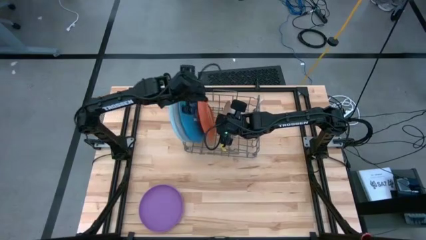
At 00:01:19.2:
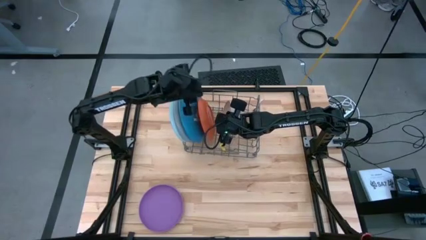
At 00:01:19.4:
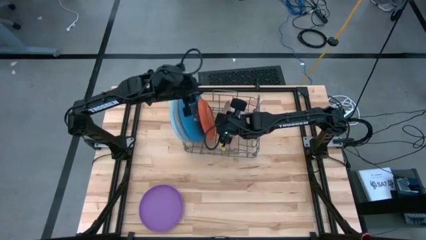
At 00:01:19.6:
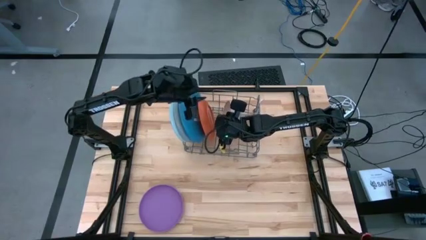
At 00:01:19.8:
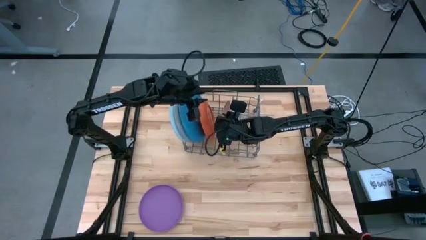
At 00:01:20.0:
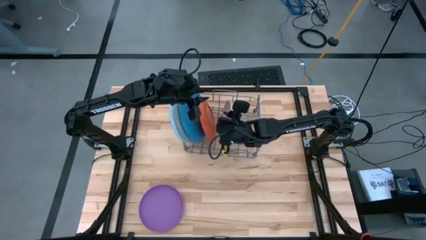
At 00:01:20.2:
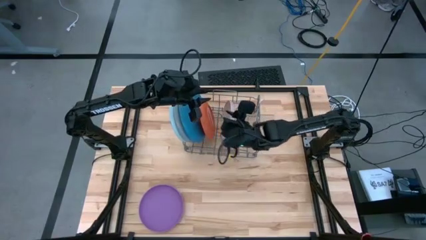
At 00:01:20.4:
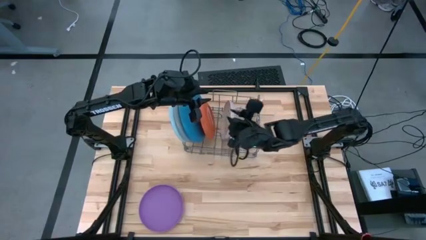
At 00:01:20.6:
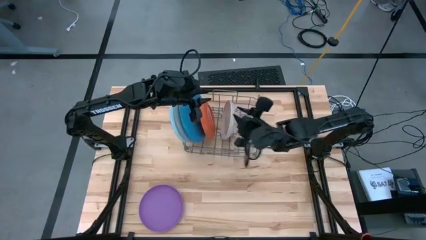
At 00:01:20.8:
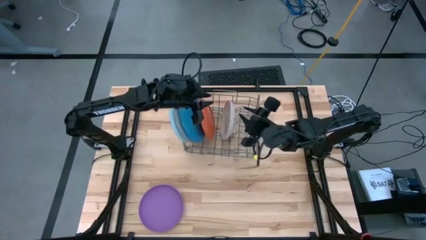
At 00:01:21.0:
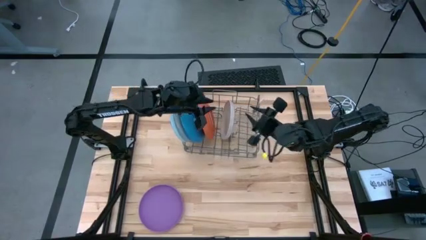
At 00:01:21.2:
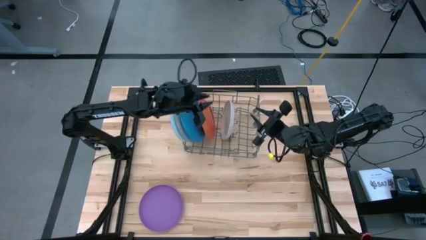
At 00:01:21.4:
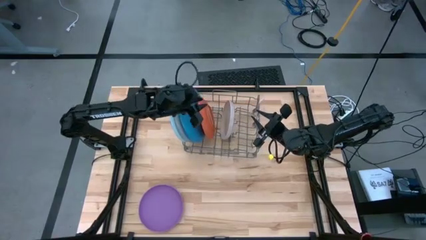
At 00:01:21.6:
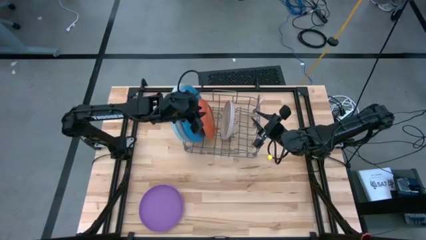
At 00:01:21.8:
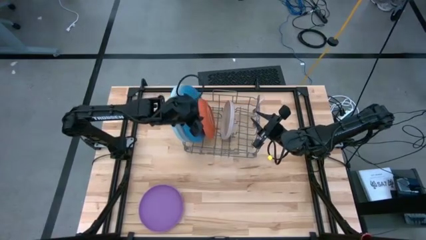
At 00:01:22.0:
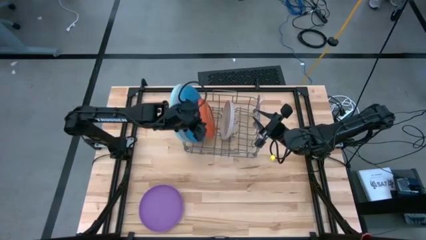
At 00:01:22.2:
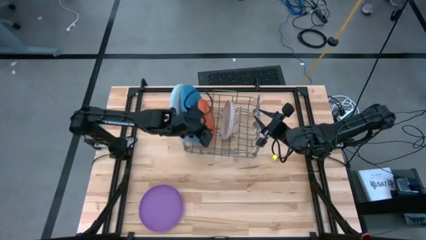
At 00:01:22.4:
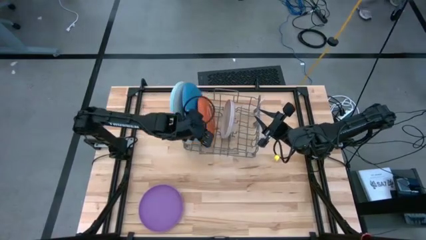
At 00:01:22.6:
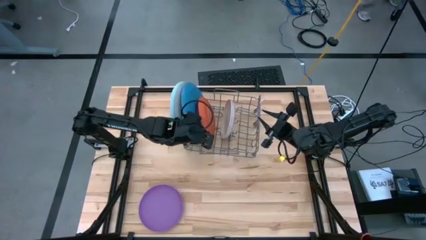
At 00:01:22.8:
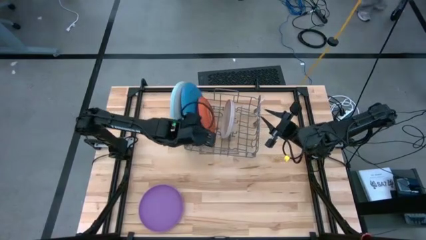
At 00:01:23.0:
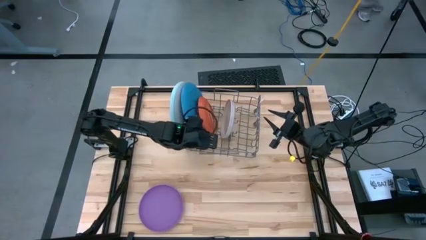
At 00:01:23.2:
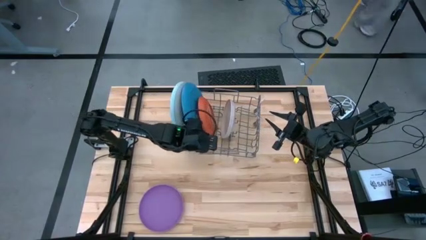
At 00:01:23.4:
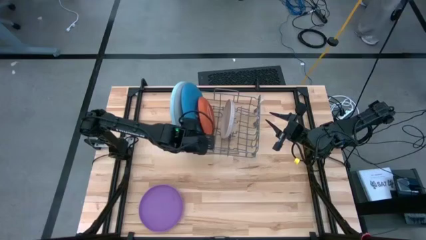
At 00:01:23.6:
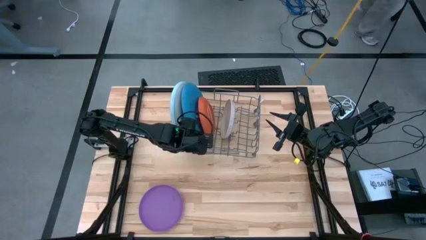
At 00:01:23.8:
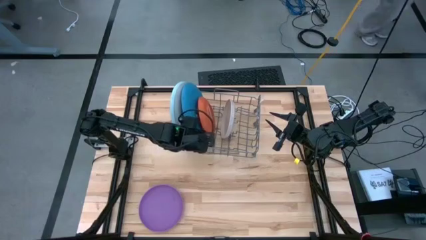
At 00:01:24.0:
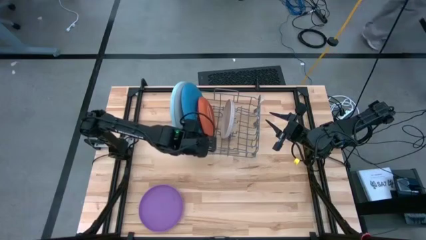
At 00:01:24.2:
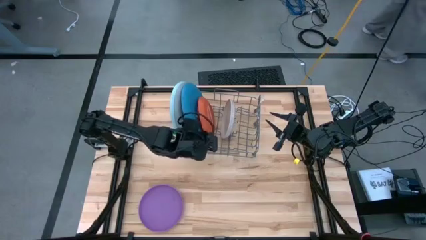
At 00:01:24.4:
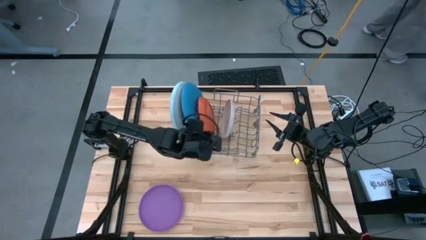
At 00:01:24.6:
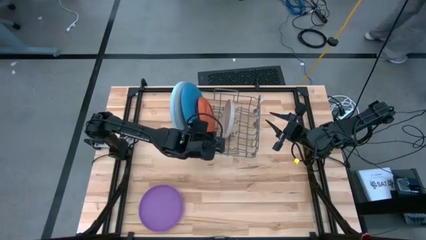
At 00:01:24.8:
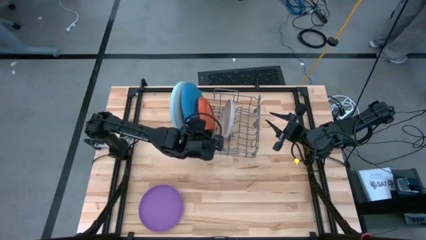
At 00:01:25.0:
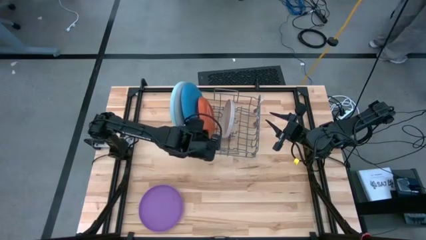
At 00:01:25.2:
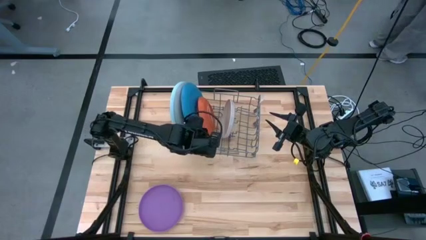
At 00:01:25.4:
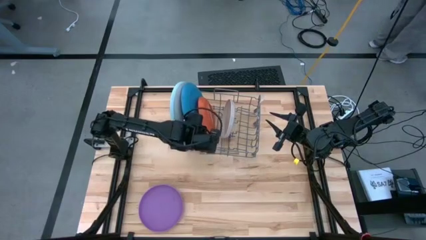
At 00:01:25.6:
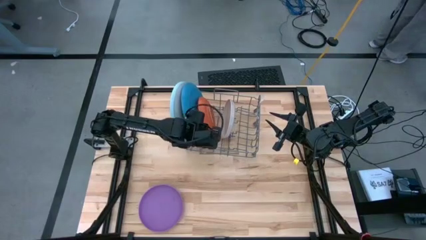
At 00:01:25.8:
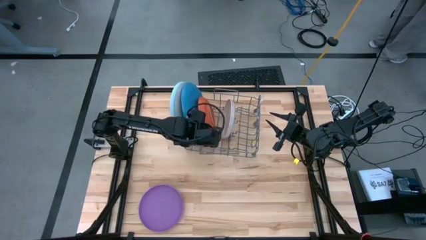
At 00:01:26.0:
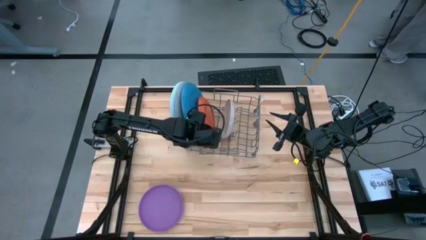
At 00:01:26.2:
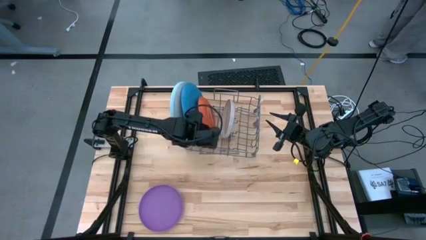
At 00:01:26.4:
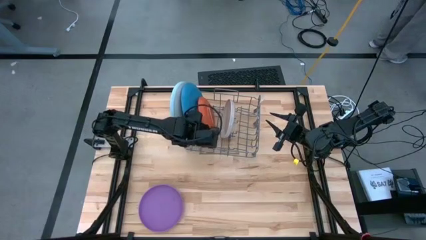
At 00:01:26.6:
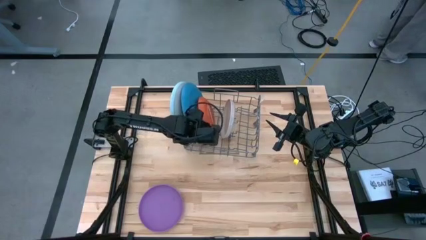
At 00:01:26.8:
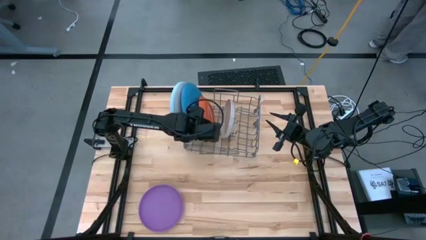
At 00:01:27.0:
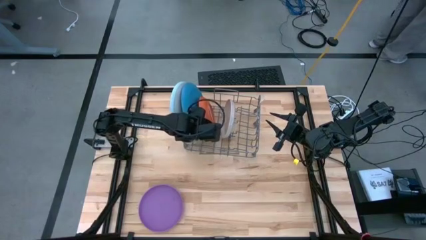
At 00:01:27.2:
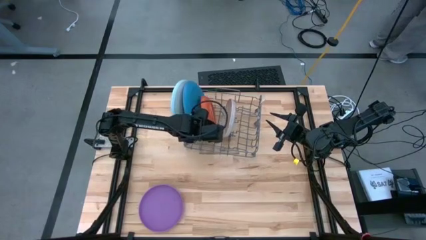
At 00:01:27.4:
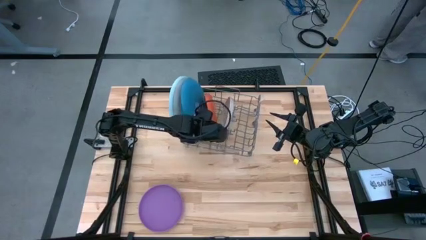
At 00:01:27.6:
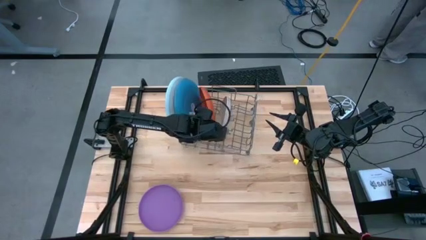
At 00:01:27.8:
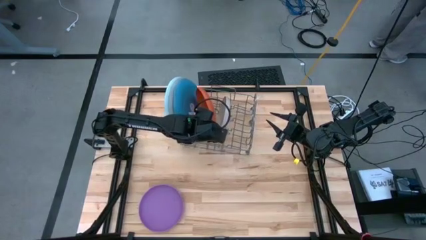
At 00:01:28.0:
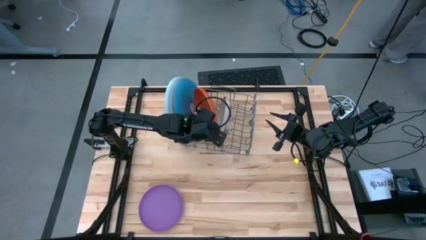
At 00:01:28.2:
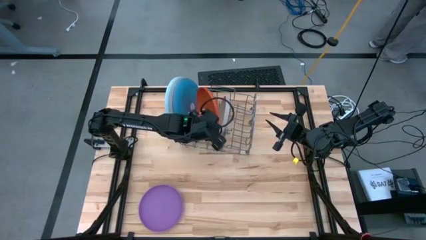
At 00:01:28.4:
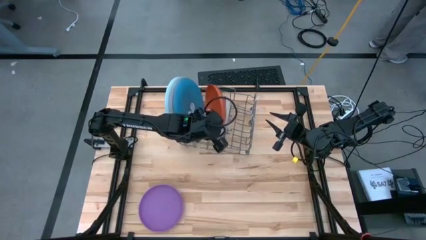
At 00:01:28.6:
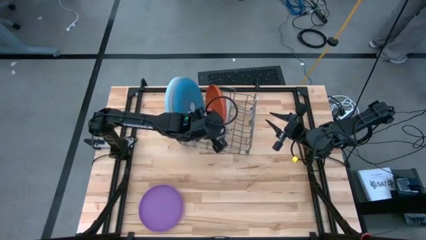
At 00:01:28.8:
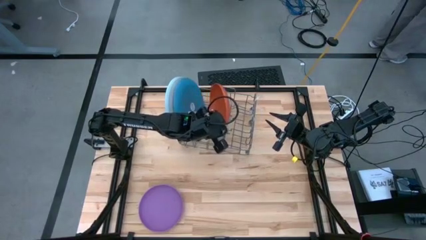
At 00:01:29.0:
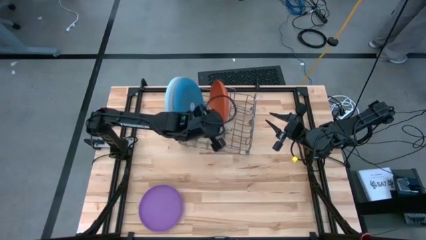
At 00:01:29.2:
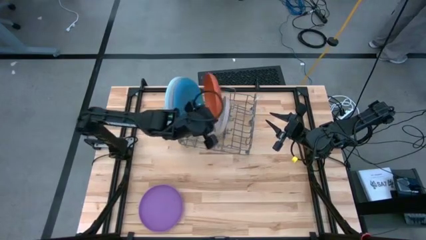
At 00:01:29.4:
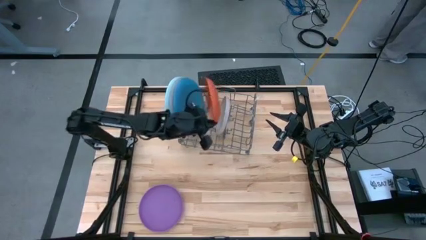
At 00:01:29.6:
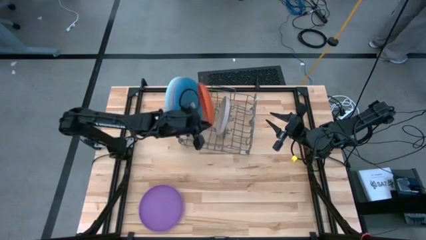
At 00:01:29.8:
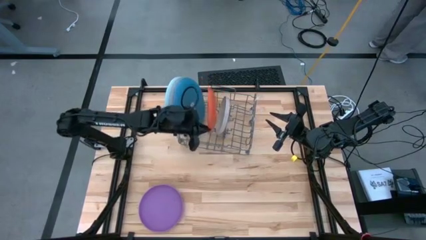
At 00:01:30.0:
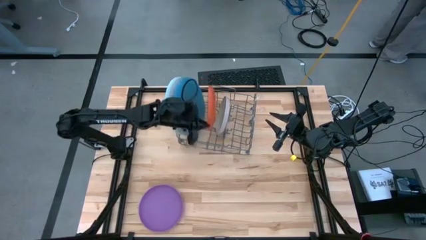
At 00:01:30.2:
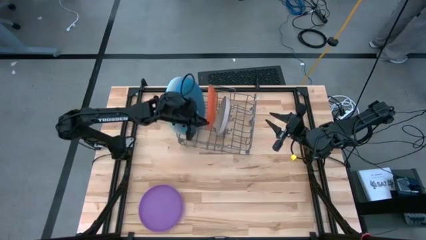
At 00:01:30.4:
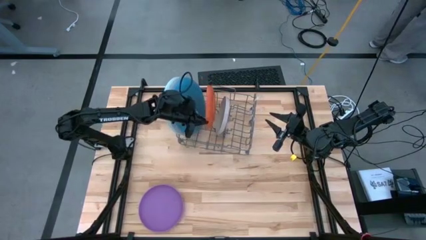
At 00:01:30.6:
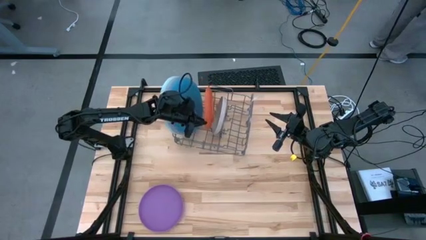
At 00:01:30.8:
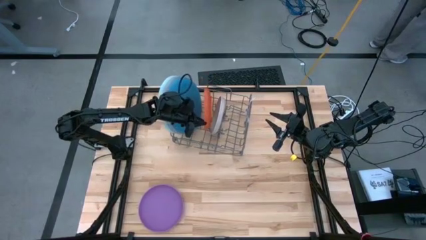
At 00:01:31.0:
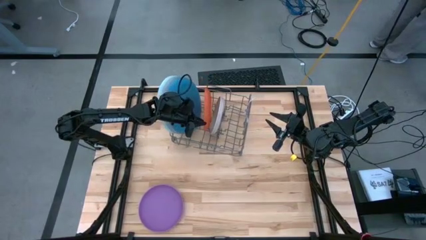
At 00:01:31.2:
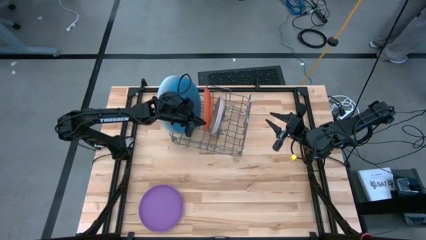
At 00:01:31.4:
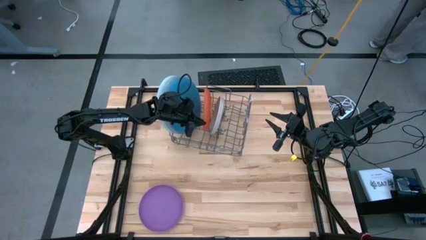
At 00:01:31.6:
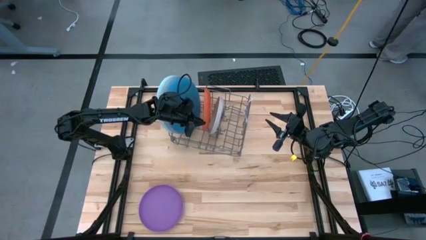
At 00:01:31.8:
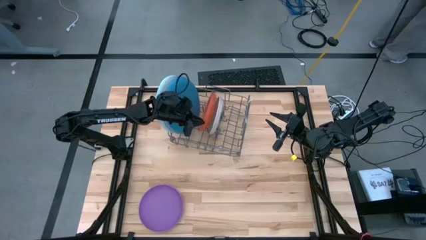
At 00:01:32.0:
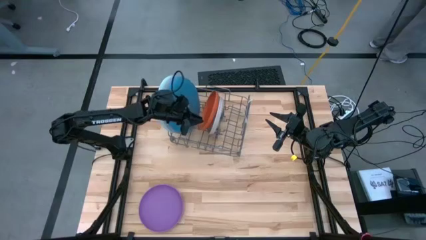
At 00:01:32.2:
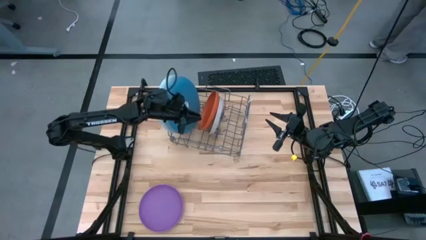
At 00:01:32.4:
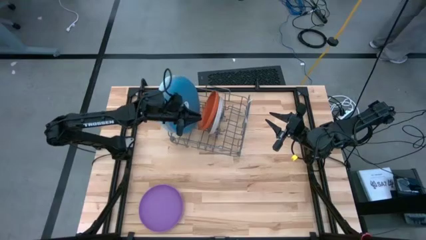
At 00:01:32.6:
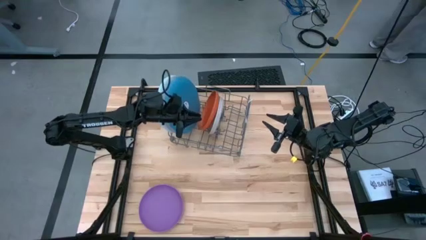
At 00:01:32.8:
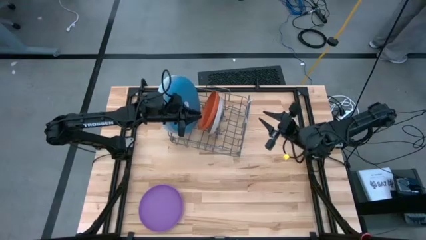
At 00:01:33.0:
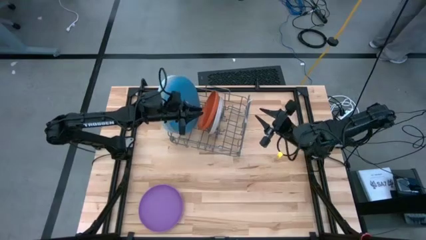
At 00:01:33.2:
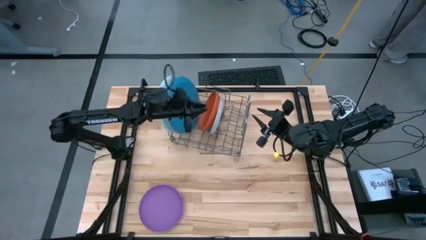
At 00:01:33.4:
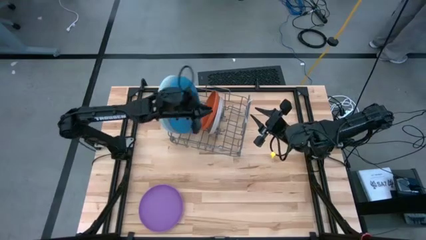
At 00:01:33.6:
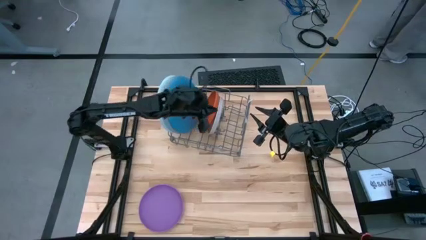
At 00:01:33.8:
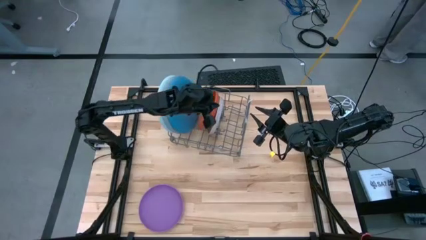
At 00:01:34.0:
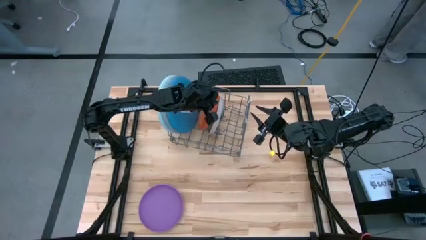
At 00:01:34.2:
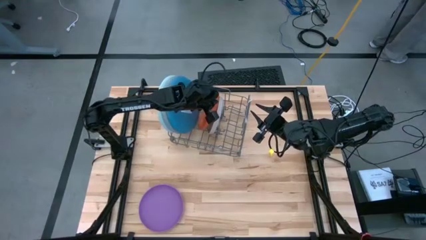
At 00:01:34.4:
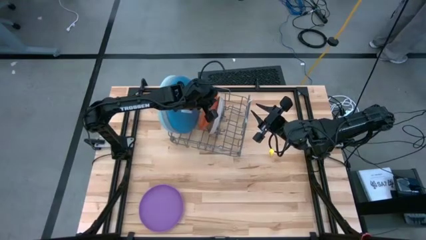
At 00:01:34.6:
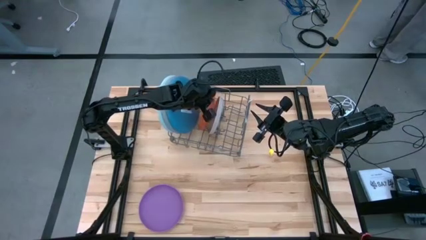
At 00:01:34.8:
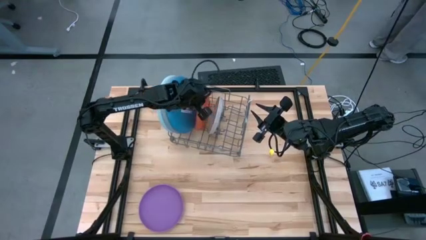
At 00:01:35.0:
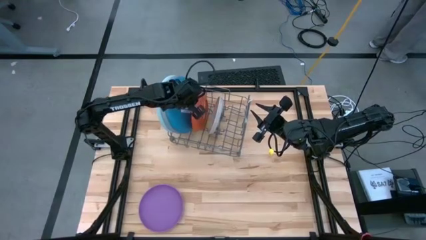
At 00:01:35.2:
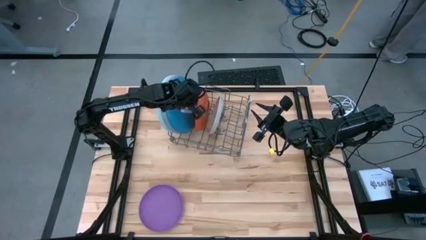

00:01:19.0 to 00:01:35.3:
Task: Sort dishes
Put the orange plate into the dish rack
